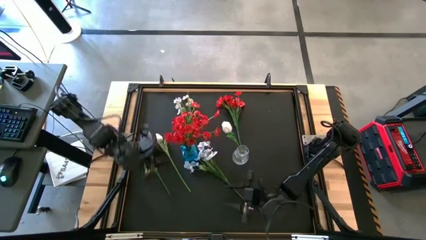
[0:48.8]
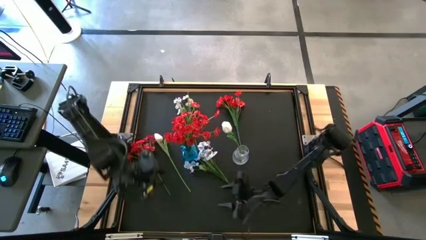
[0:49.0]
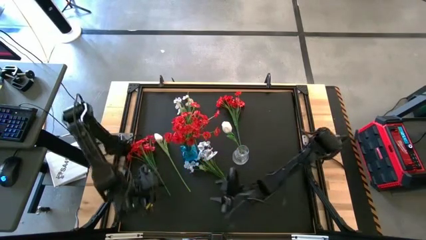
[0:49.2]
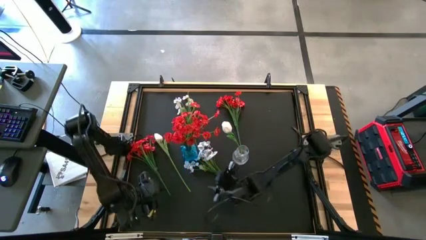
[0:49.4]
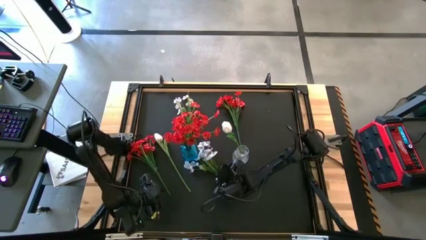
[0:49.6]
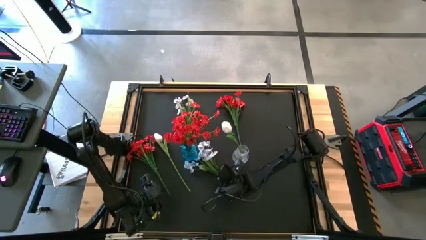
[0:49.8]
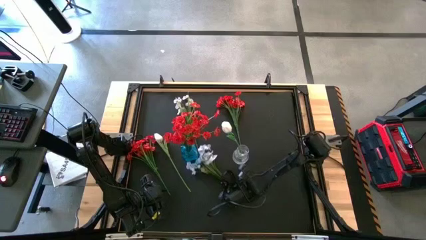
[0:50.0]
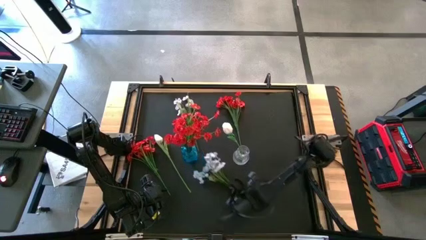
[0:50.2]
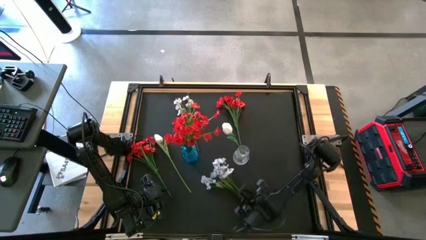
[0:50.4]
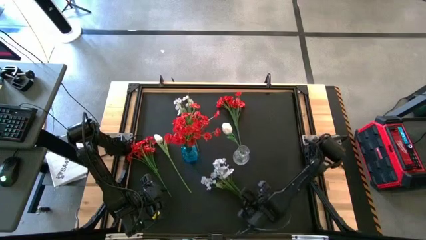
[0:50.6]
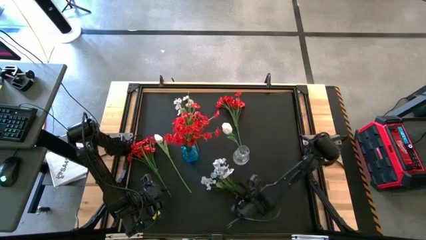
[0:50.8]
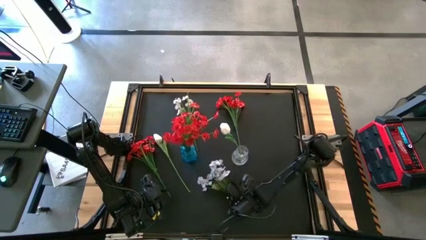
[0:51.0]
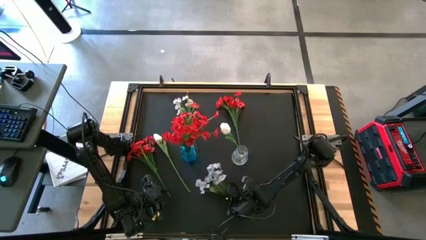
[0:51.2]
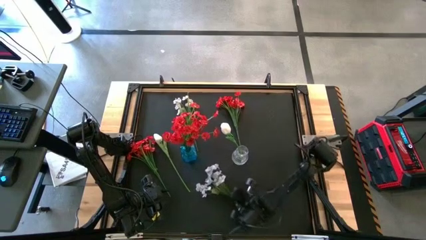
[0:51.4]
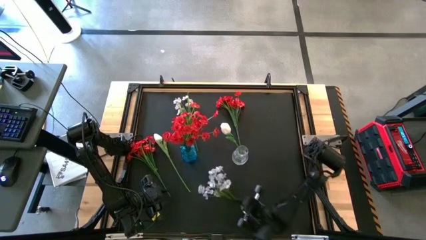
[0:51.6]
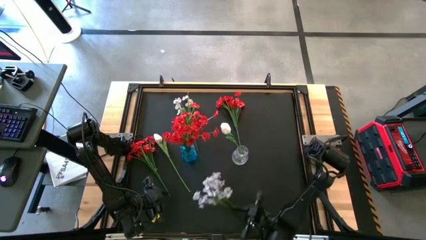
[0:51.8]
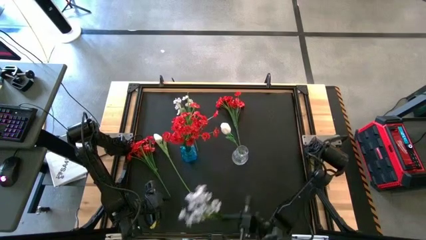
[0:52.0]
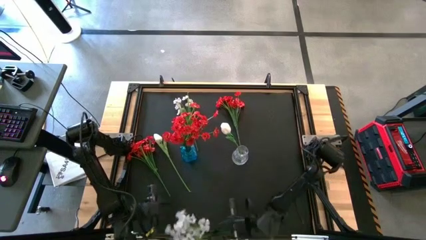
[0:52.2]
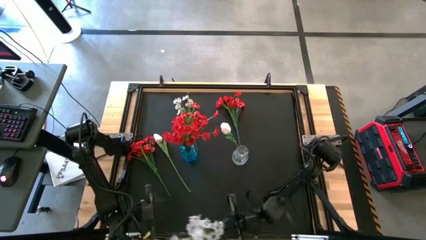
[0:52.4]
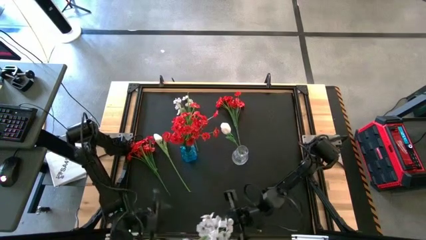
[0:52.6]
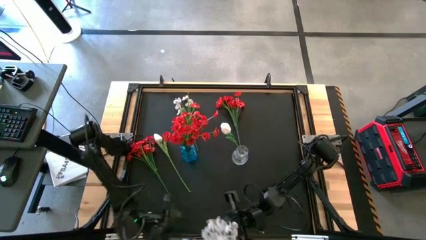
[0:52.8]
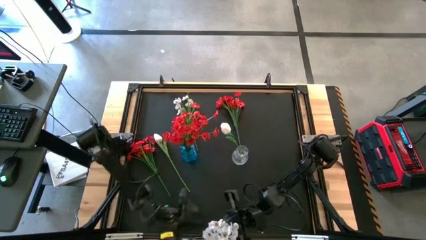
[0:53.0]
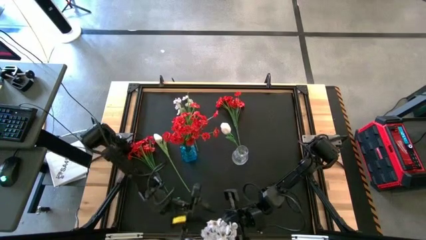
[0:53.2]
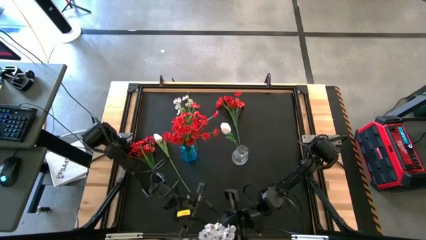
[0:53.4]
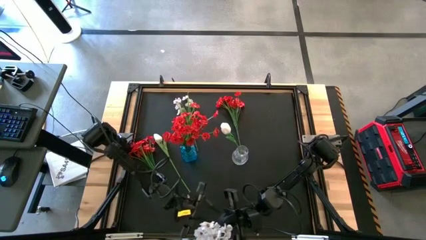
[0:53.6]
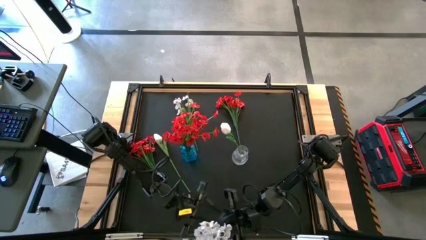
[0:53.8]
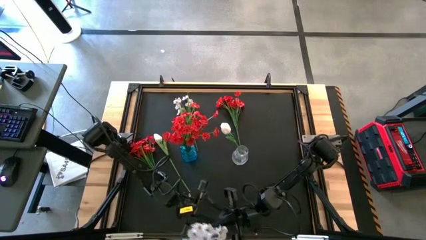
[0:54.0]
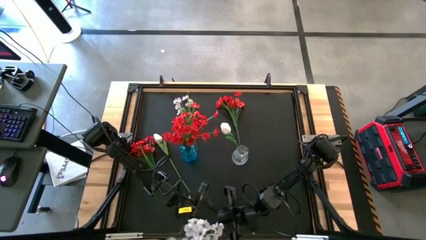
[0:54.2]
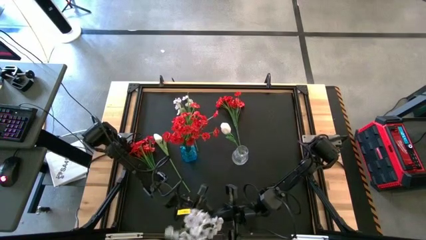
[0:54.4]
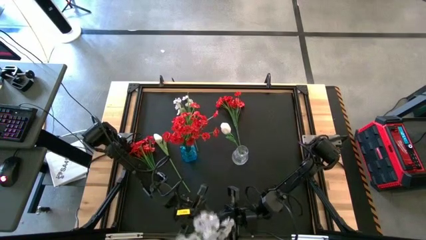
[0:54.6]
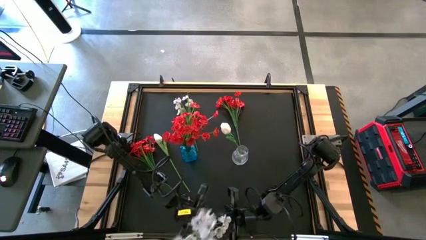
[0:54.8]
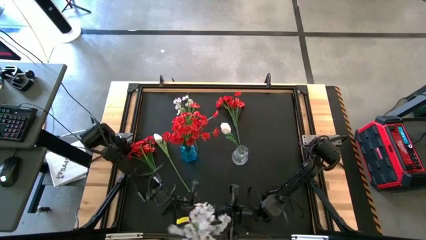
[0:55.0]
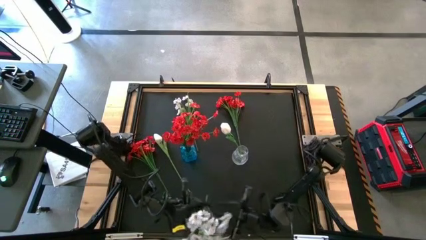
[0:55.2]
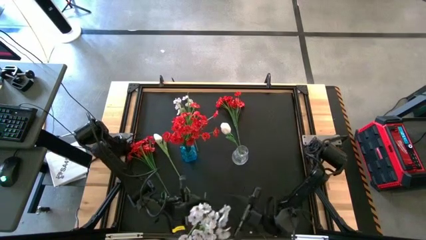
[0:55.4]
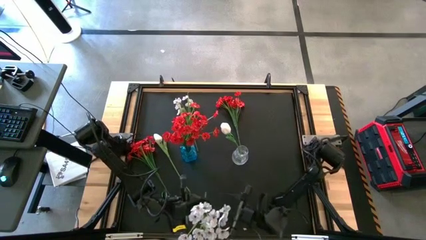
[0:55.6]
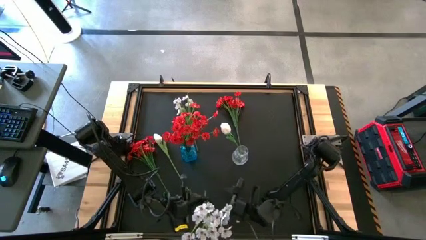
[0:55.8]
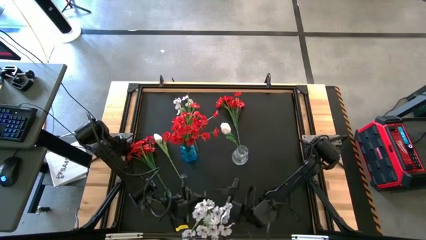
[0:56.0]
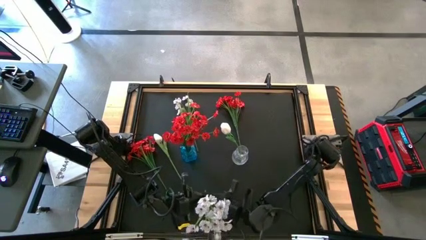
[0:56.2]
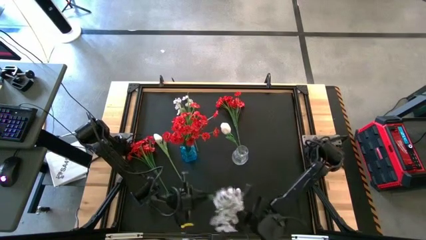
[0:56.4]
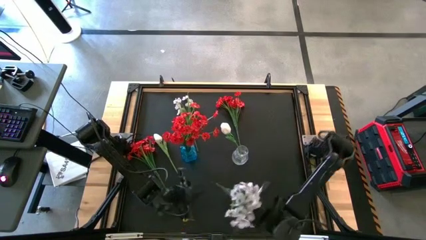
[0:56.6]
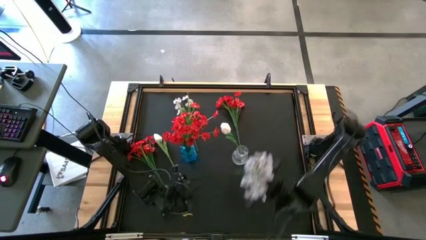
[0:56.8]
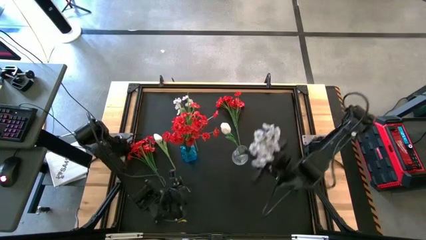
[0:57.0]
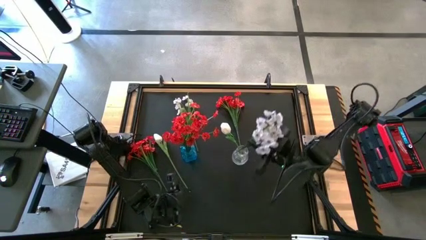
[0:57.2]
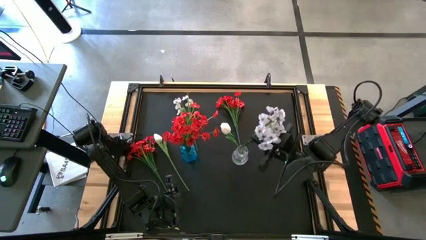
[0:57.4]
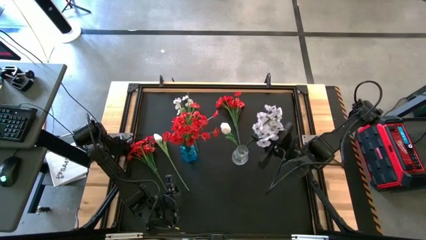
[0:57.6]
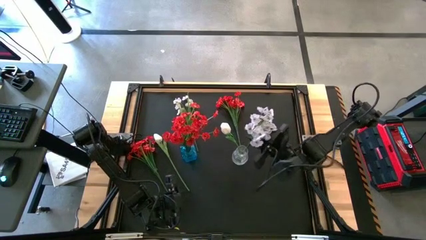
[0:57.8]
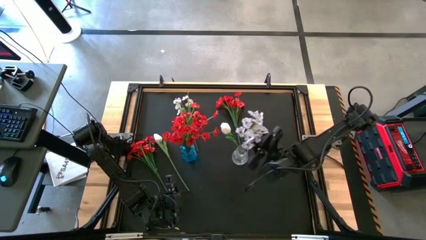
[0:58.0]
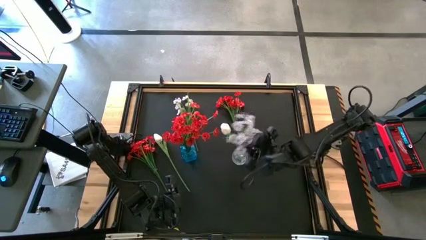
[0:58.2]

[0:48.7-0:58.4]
Task: Sort flowers into vase by color
Put the white flowers into the transparent vase

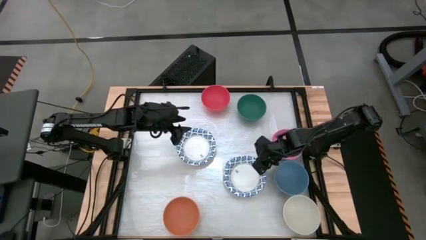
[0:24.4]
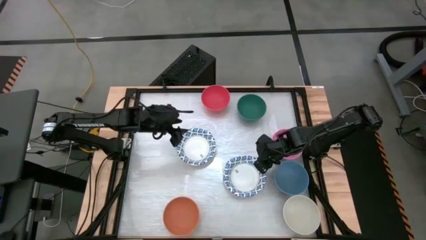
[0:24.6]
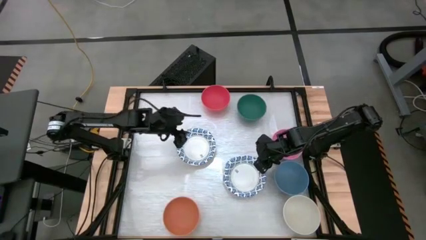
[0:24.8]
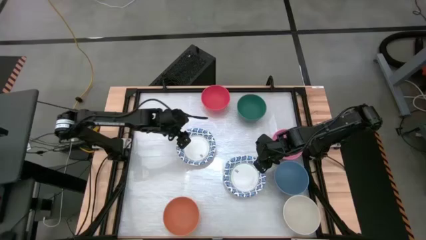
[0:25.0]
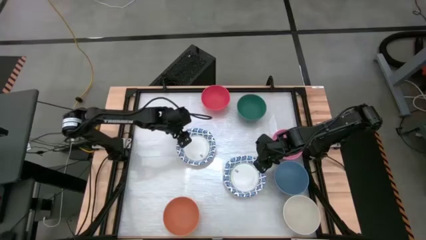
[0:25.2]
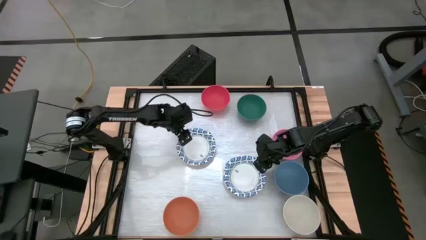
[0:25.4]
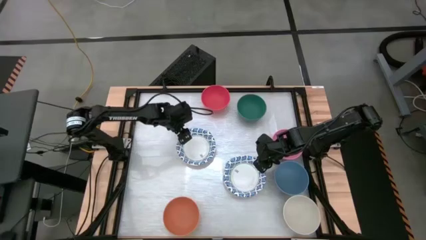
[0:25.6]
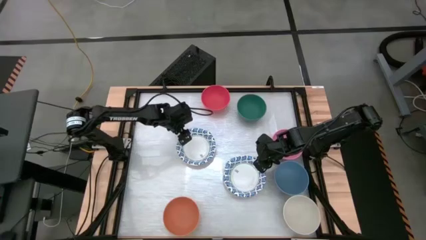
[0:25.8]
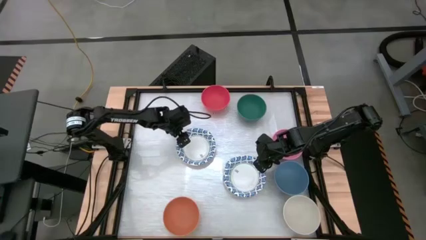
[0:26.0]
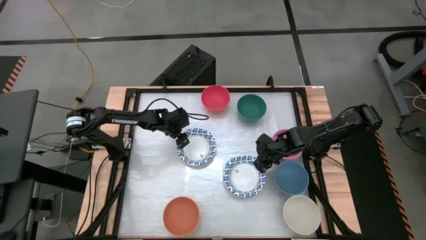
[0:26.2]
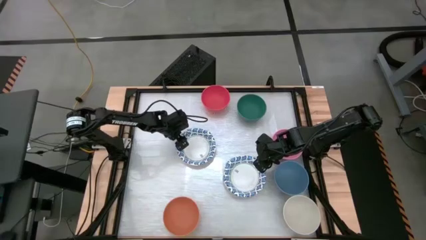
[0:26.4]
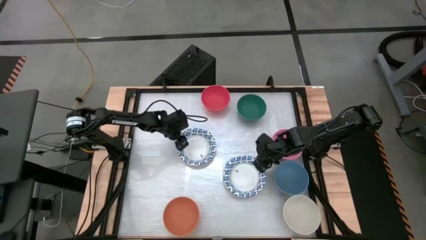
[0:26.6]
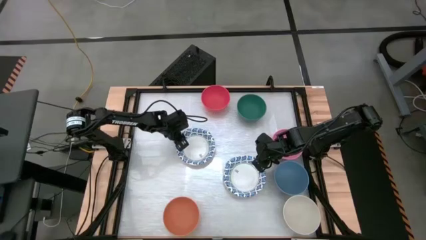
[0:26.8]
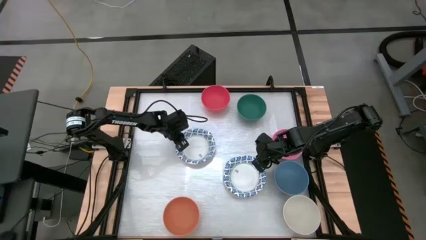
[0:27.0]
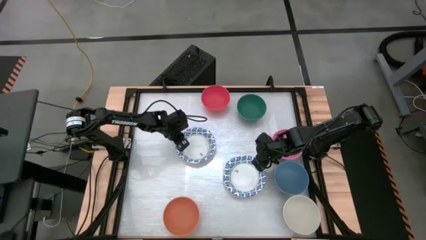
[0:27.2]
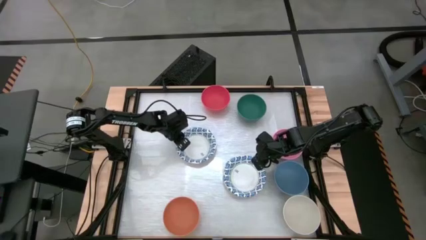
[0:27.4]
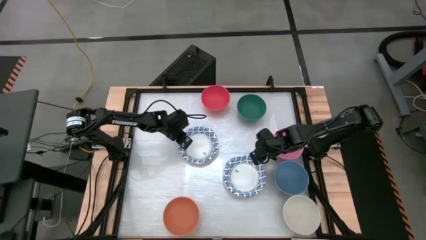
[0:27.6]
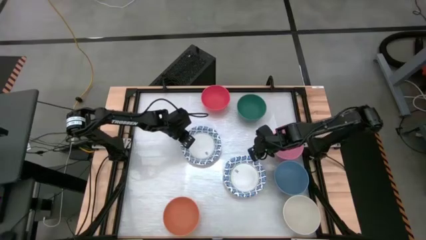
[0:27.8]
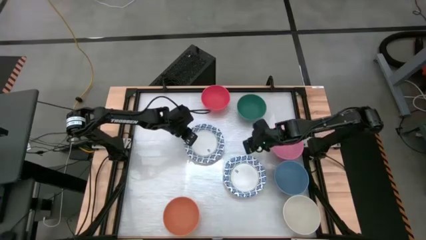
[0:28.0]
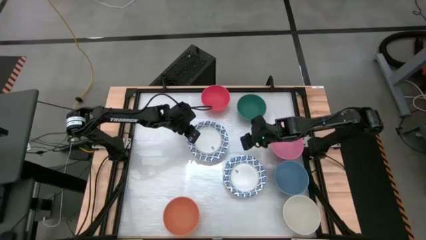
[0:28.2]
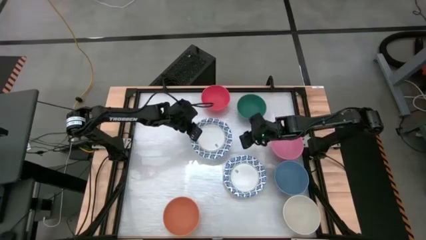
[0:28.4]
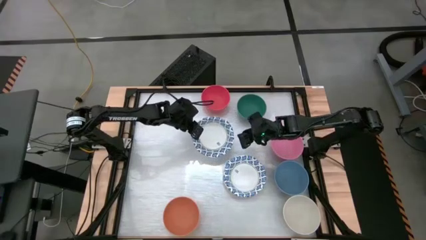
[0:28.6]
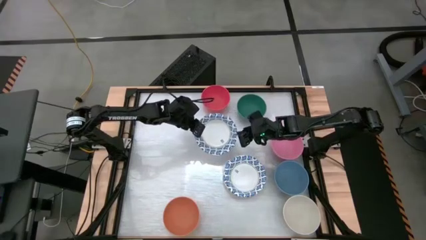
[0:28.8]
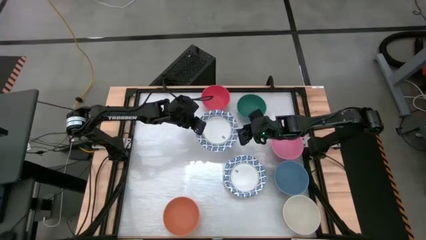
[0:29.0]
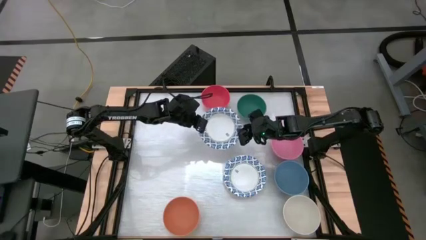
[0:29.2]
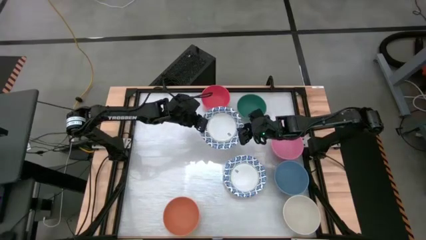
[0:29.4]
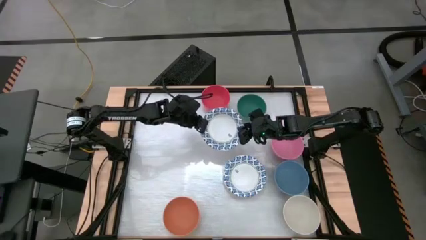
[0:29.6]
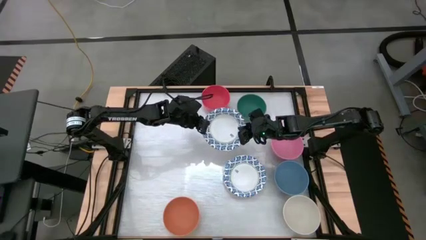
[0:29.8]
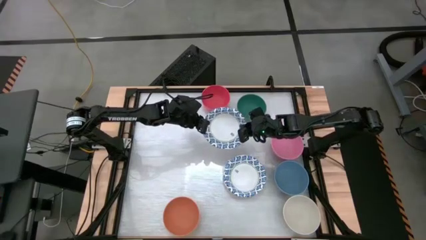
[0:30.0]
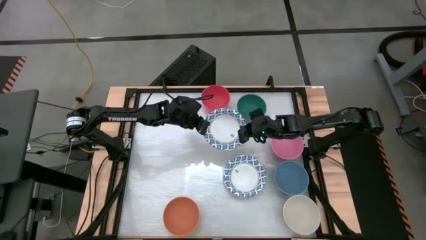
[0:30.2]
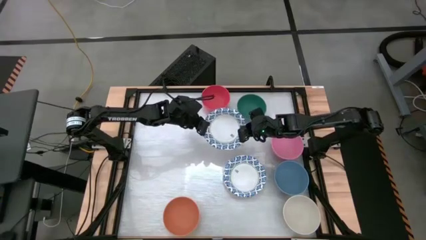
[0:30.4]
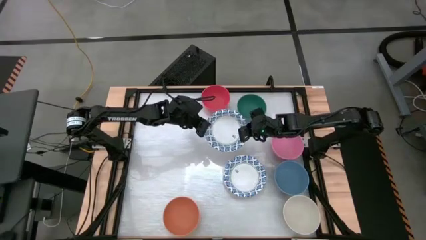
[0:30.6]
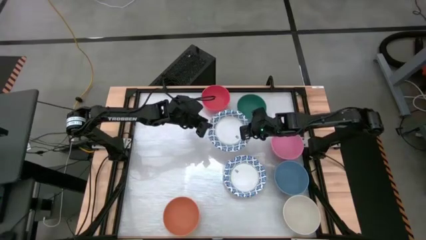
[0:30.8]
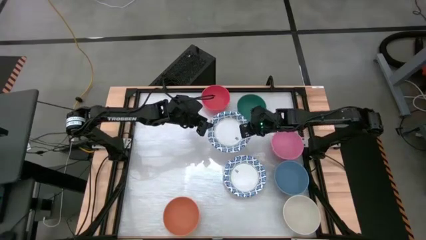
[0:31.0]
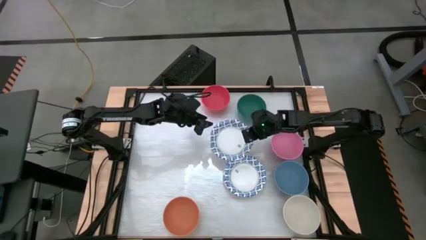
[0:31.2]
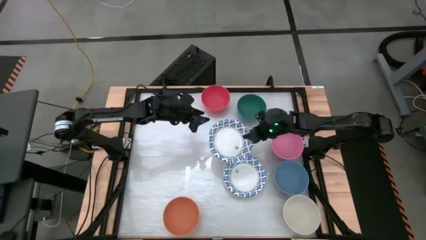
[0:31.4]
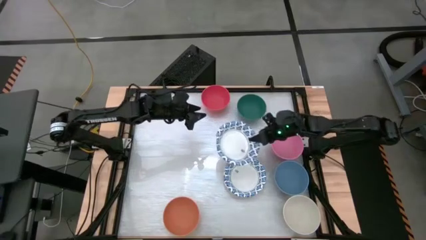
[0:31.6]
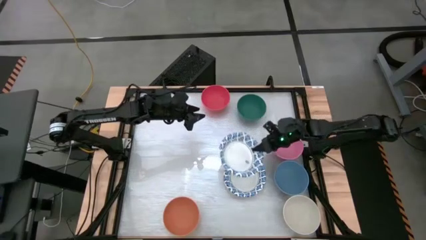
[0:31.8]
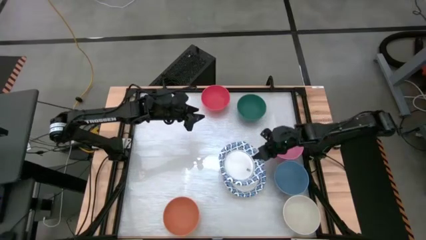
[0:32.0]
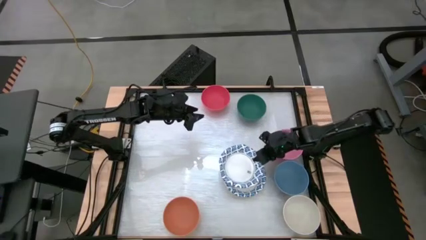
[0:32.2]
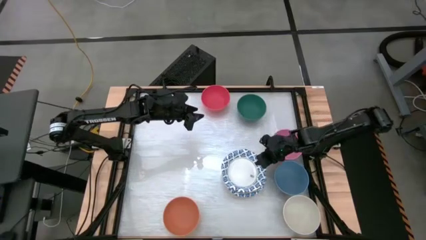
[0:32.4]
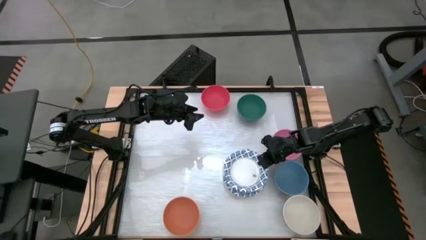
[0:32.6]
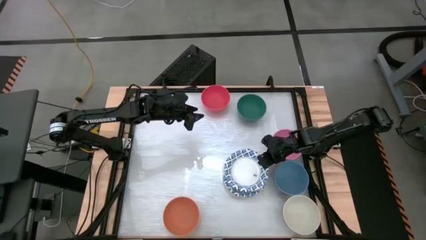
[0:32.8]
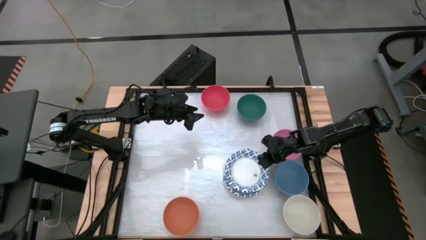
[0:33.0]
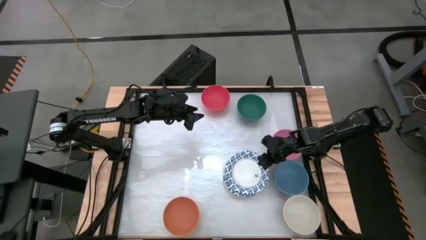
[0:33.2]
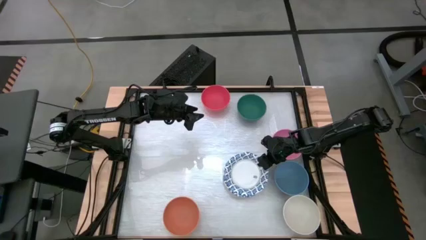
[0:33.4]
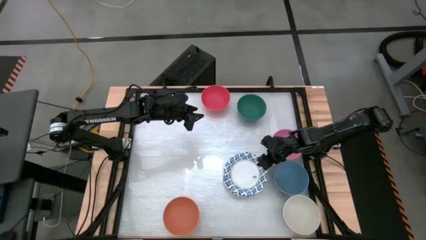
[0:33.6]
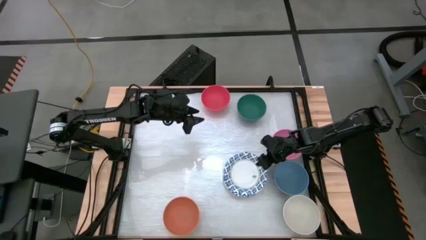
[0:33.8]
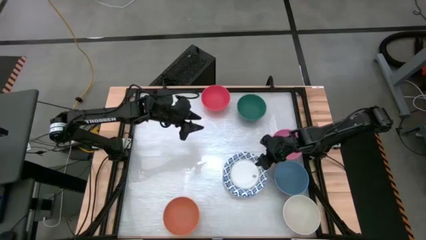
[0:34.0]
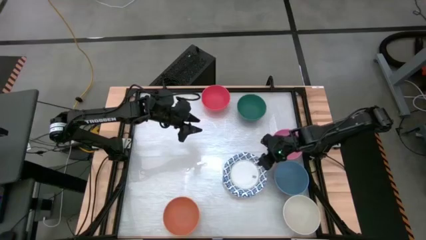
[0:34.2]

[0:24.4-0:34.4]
Task: Nest bowls inside each other by size order
Stack the left blue patterned bowl into the right blue patterned bowl
